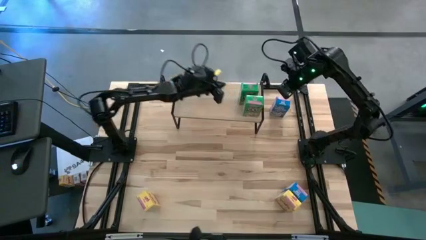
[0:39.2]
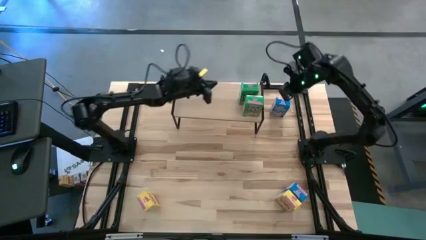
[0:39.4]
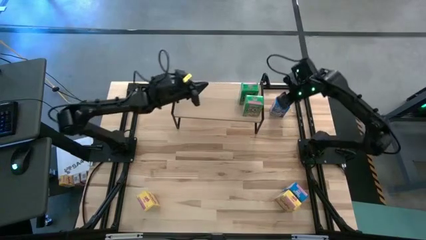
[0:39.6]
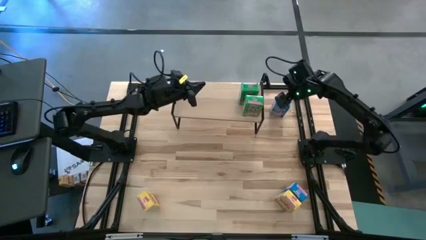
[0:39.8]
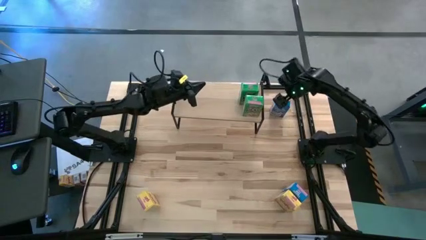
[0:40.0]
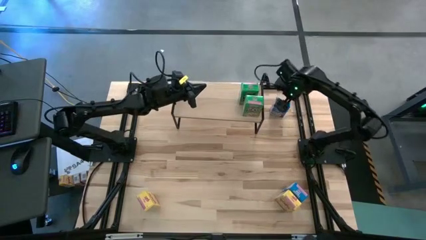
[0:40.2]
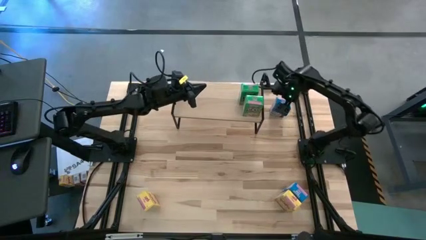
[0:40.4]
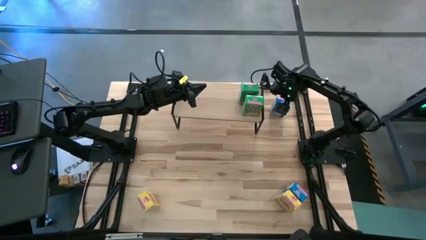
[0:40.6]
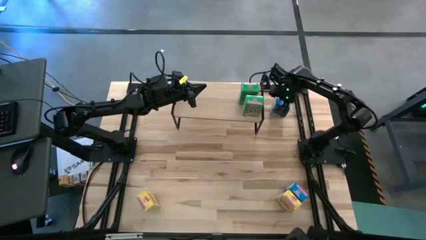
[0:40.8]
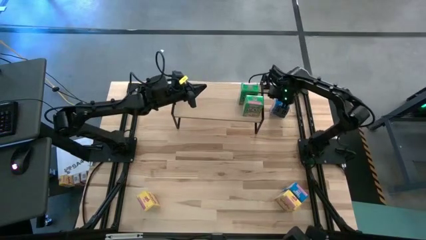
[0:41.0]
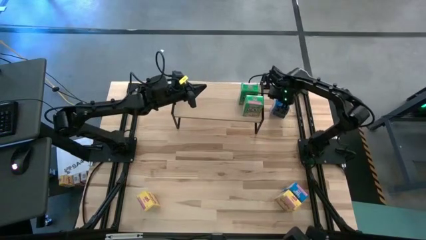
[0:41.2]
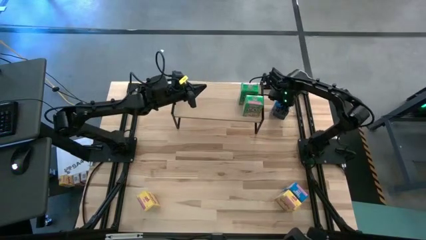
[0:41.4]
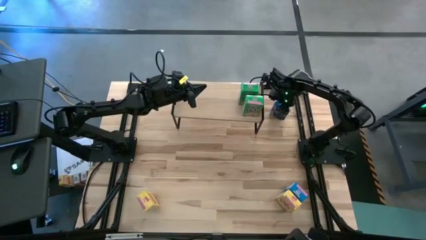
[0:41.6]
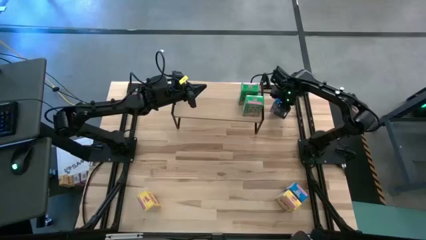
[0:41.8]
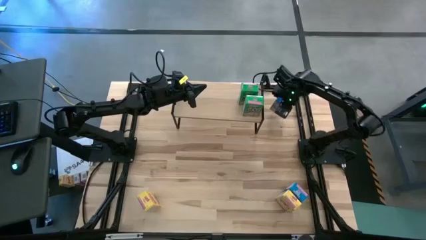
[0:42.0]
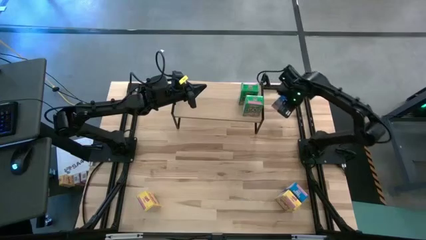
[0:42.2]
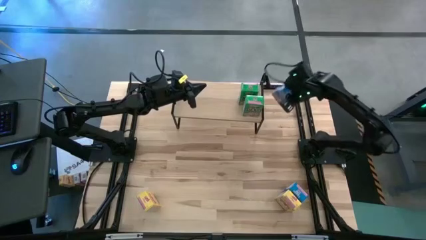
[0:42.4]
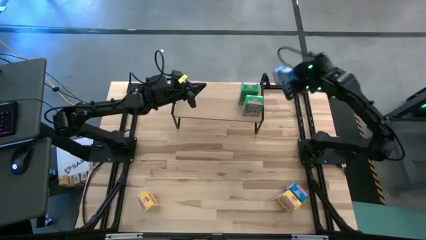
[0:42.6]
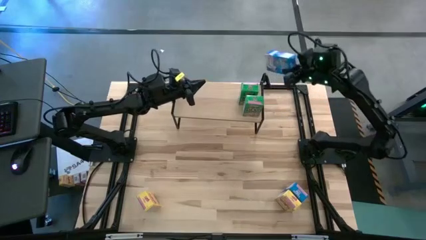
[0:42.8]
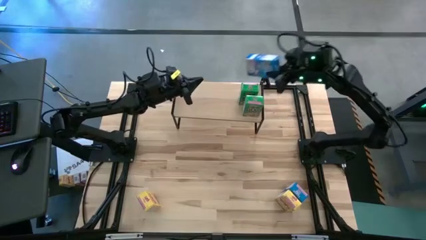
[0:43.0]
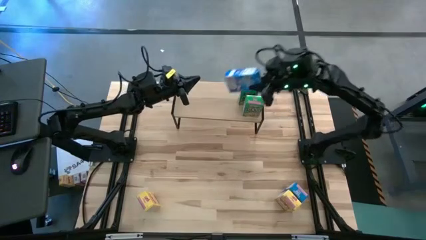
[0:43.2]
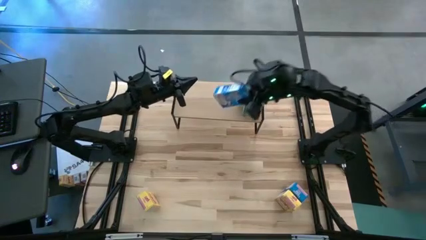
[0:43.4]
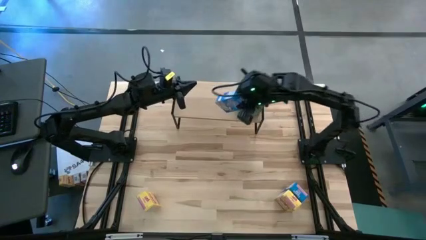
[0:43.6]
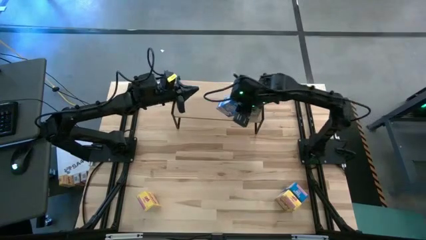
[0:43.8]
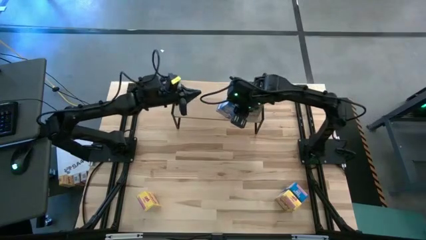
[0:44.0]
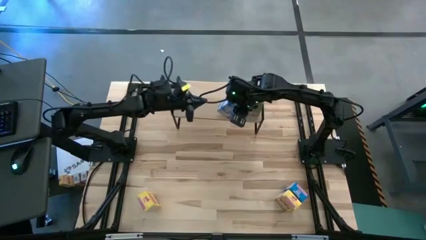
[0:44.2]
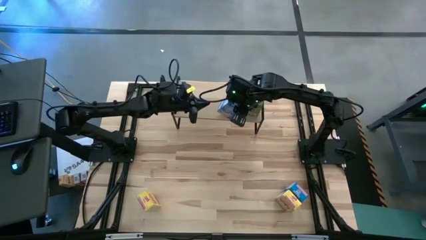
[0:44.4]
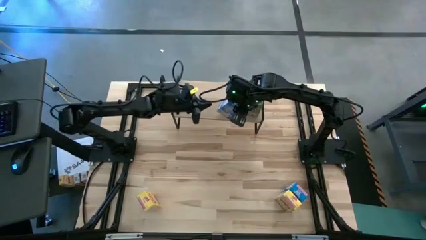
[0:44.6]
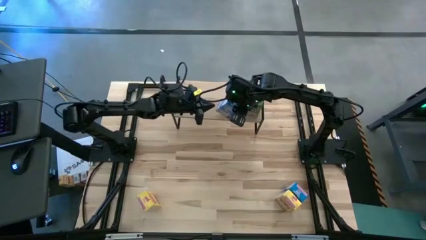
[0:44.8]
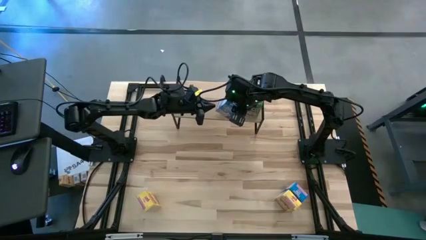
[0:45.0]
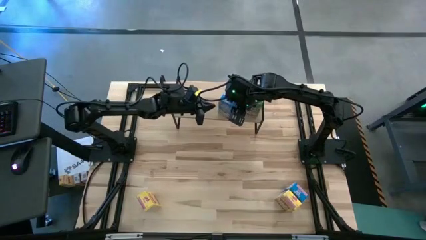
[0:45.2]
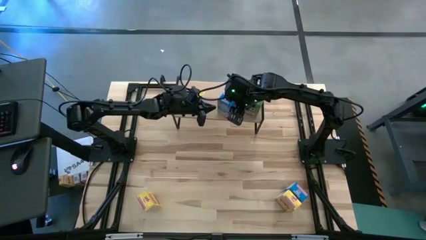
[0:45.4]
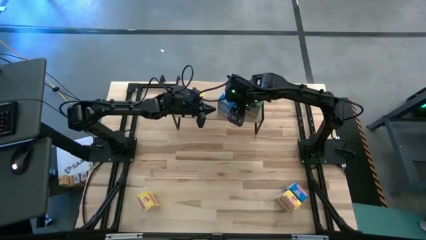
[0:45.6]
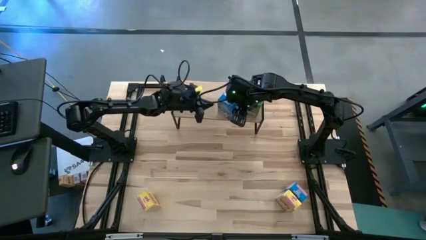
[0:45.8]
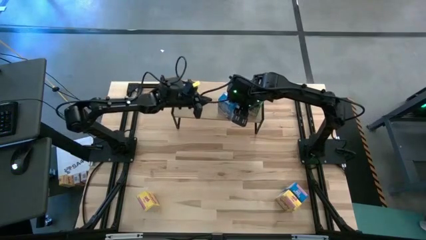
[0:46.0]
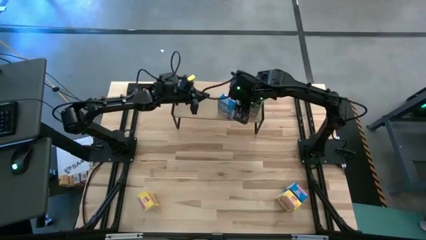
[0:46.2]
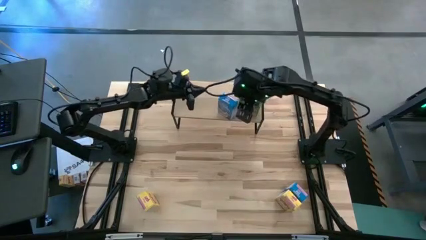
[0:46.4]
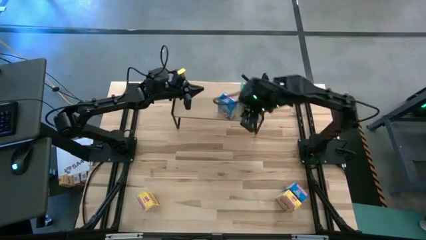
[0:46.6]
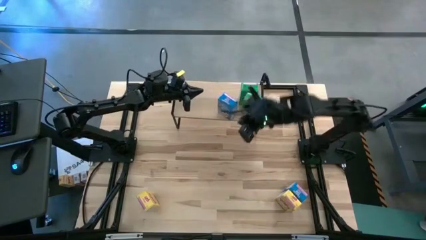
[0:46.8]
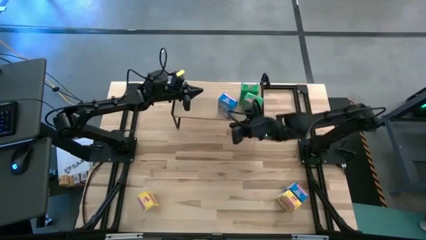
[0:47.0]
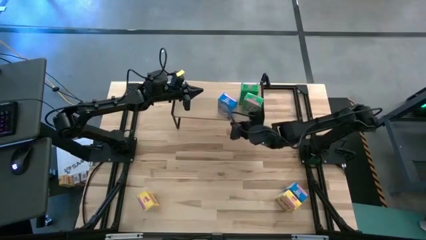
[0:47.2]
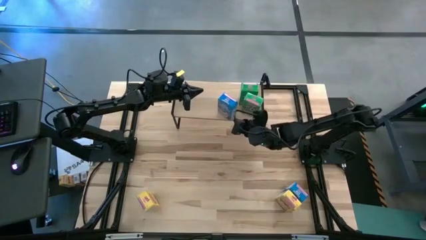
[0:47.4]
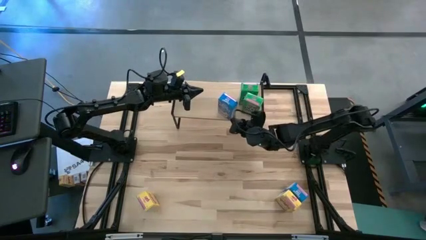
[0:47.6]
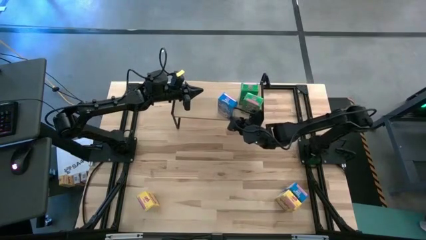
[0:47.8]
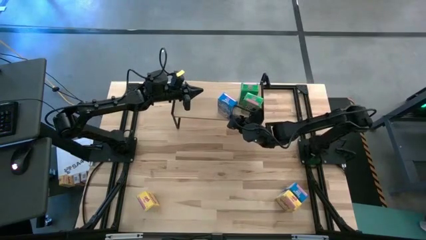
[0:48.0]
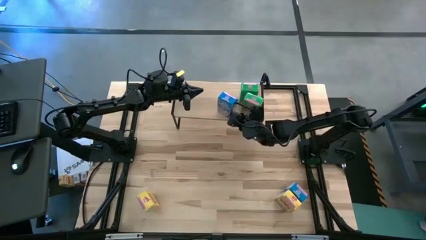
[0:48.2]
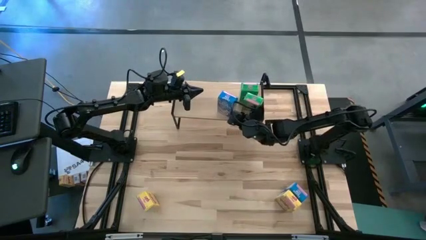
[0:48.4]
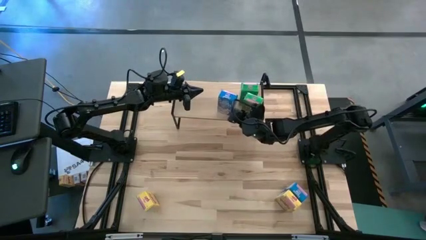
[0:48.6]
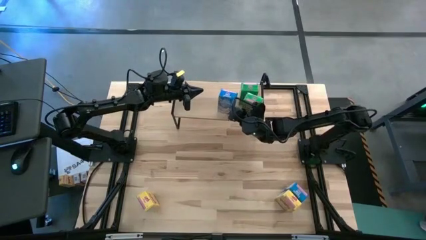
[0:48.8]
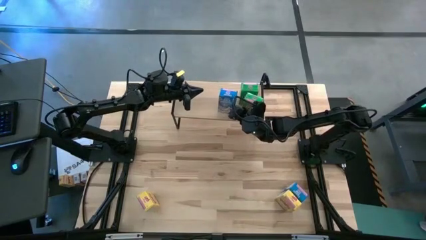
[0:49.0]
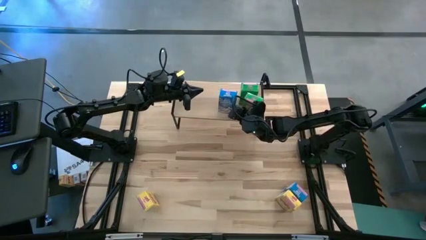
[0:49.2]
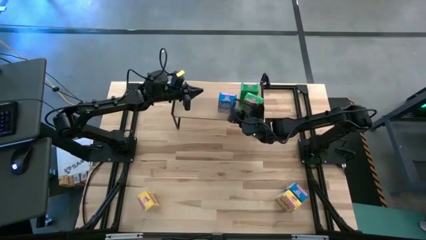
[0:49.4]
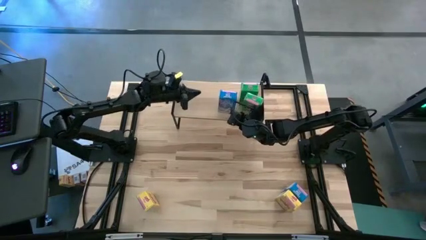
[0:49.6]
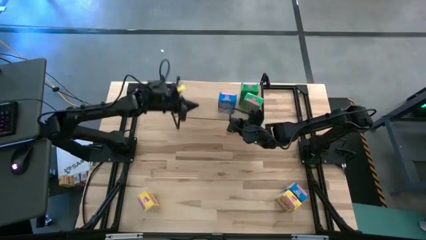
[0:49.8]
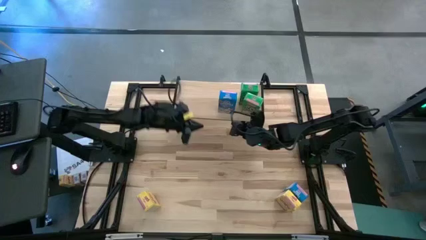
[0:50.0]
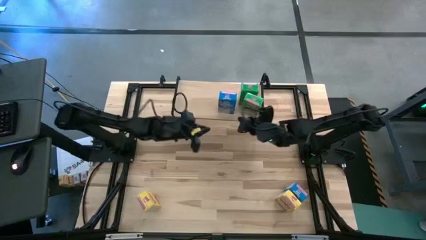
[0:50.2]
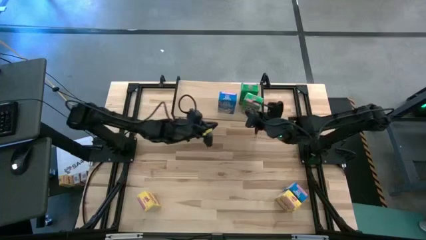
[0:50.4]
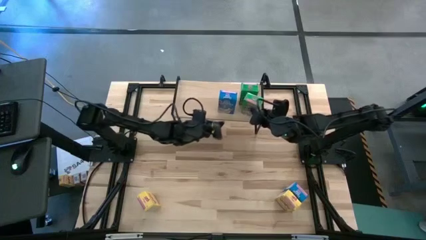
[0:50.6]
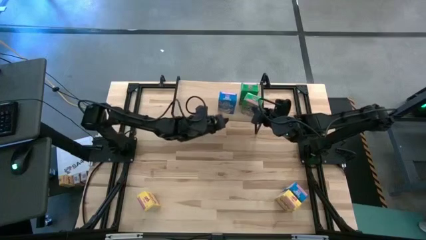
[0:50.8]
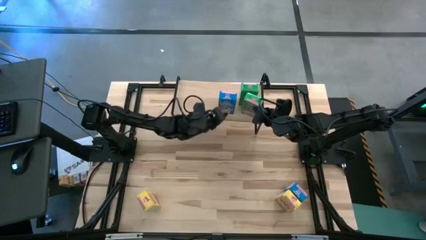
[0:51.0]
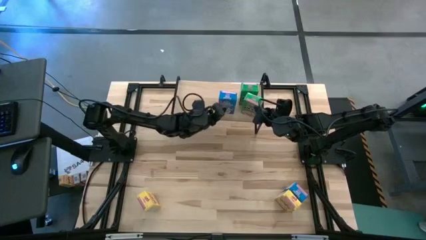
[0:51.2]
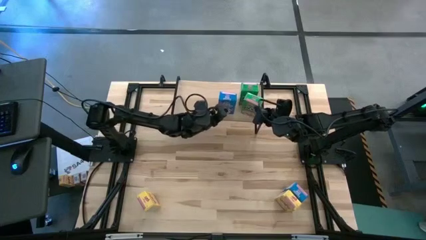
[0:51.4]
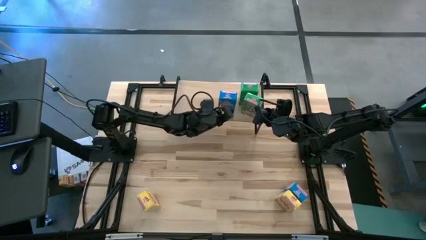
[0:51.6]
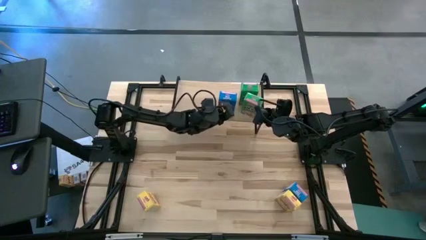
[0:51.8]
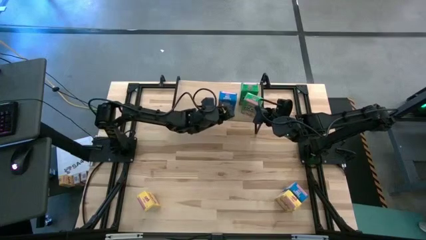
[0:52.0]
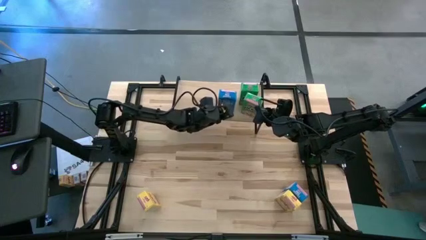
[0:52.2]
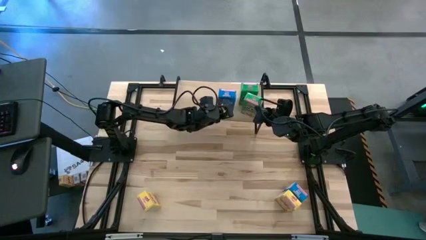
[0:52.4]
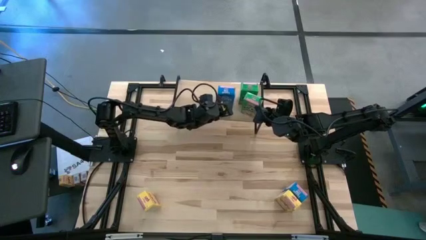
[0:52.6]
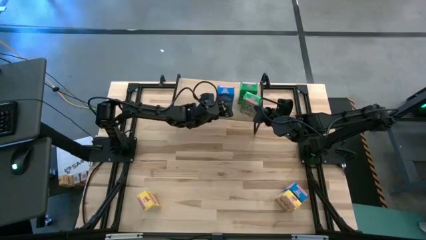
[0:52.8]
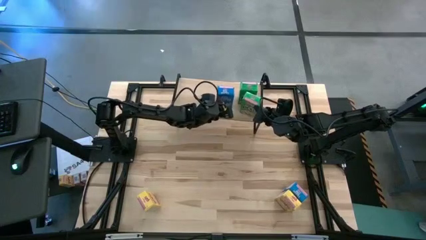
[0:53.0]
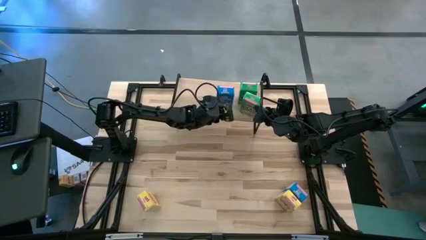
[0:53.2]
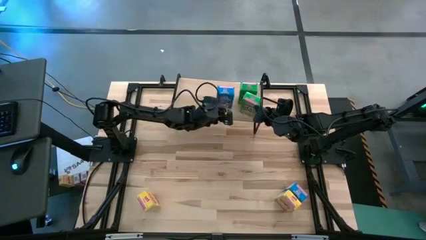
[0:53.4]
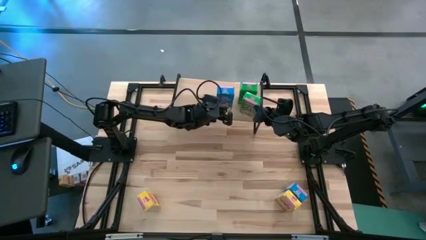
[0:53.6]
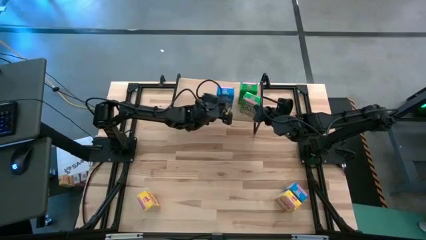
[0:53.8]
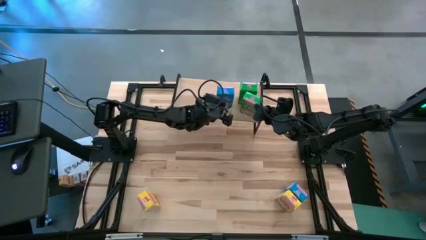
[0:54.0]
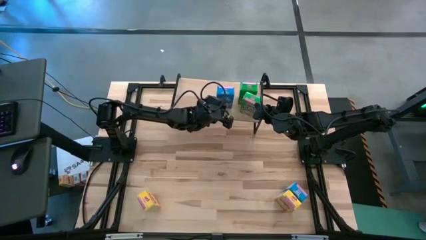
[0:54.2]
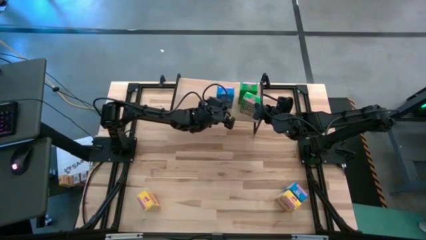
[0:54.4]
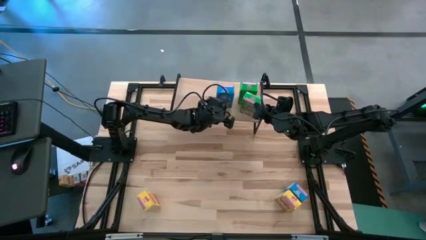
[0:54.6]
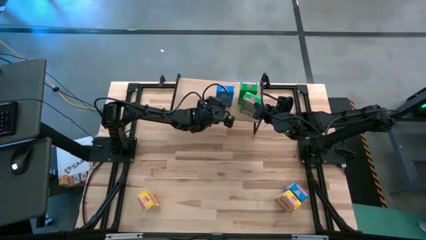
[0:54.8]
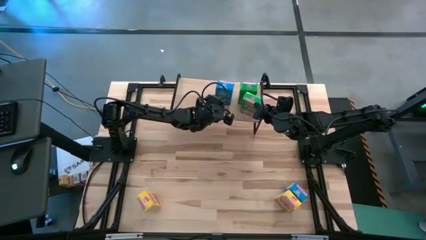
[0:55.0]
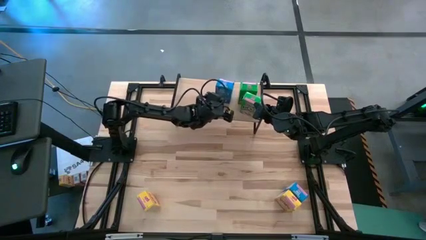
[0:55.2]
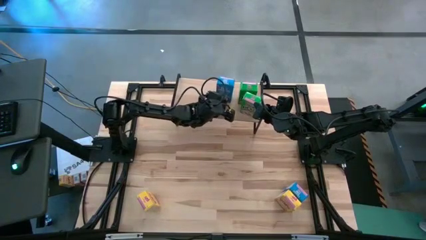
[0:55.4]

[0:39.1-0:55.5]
Task: Stack cereal on shelf
Put the top blue cereal box on the shelf
